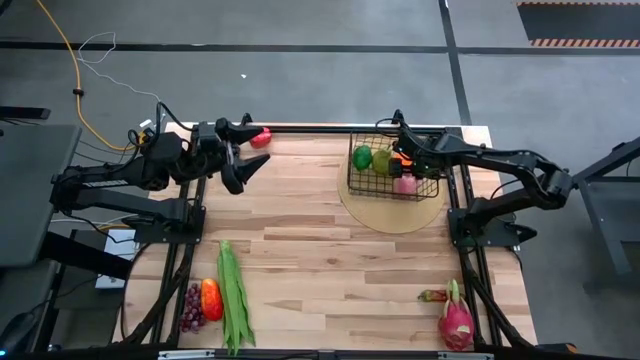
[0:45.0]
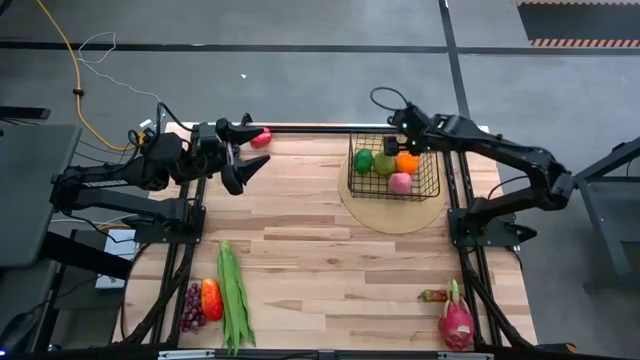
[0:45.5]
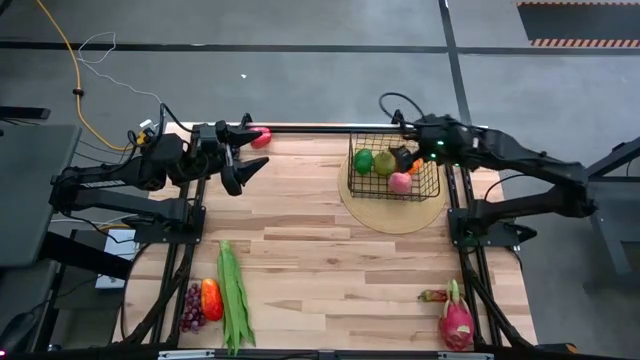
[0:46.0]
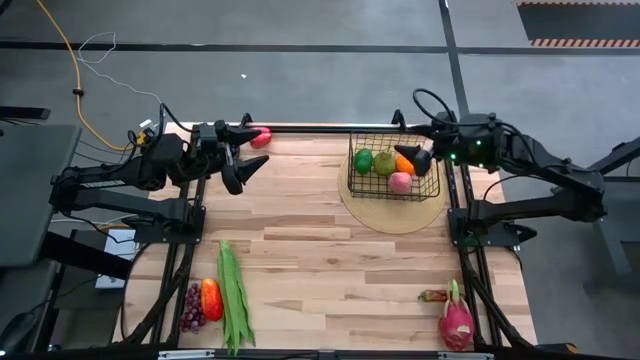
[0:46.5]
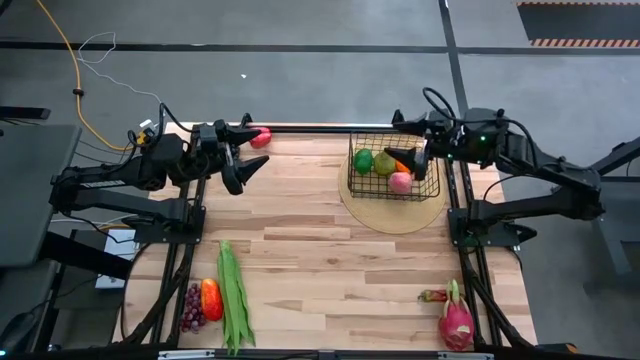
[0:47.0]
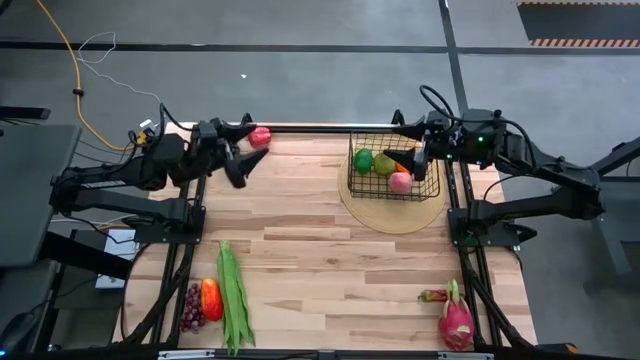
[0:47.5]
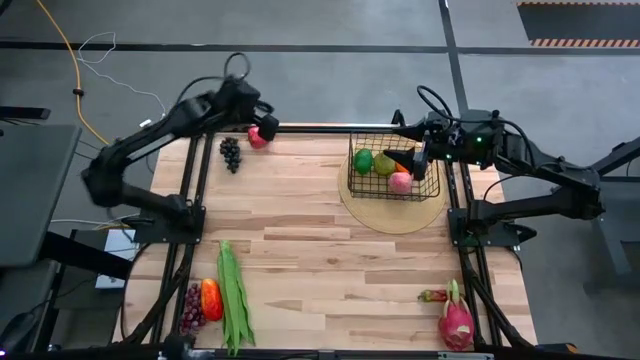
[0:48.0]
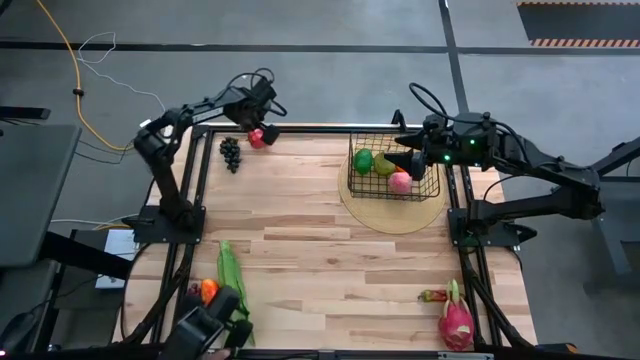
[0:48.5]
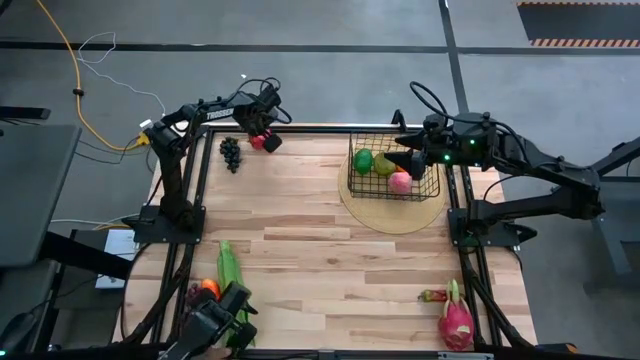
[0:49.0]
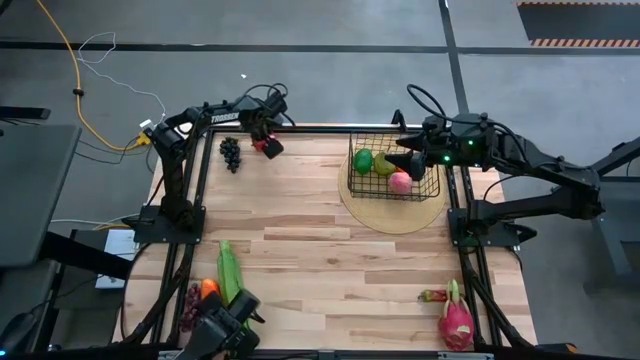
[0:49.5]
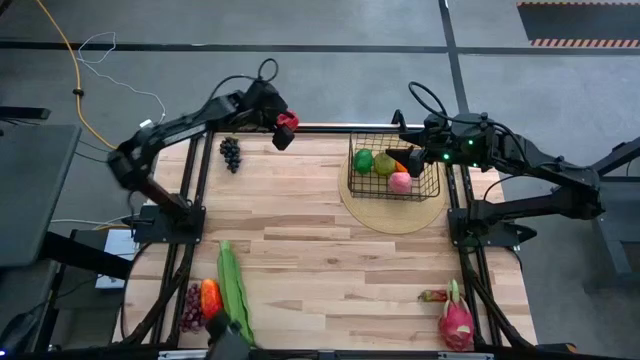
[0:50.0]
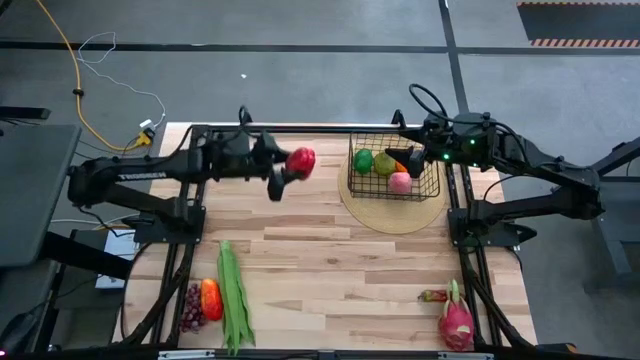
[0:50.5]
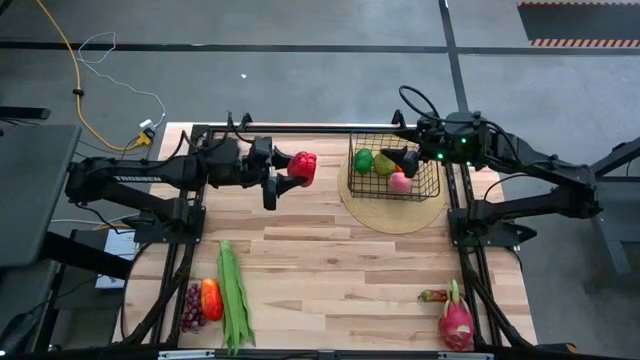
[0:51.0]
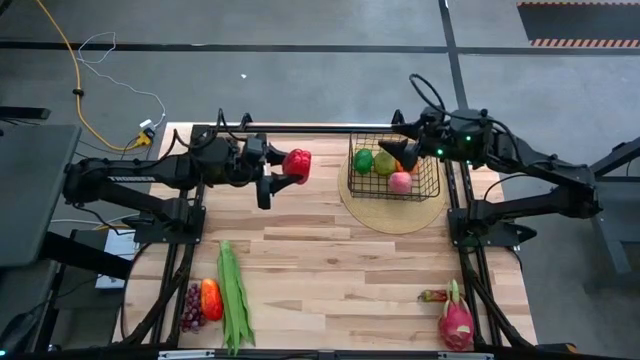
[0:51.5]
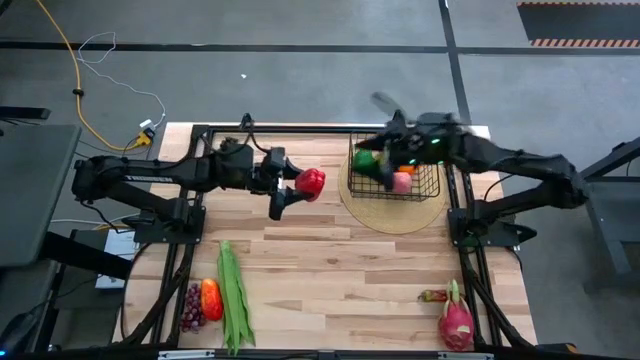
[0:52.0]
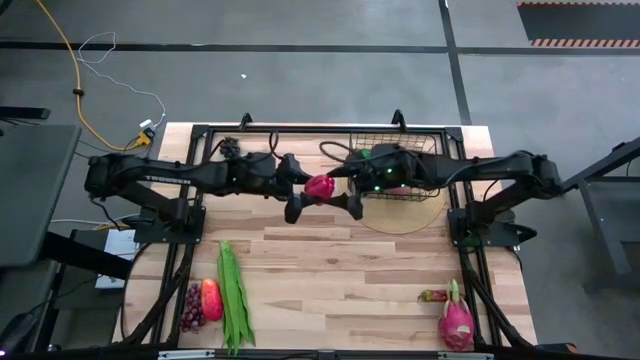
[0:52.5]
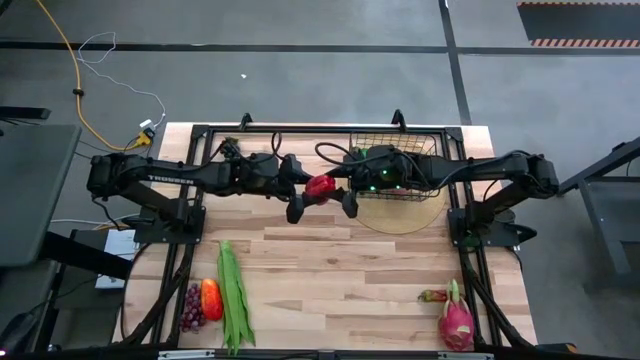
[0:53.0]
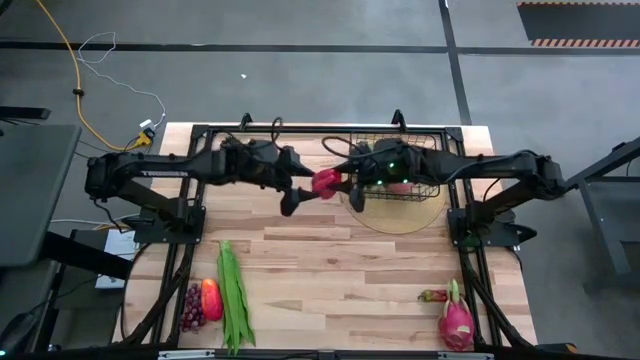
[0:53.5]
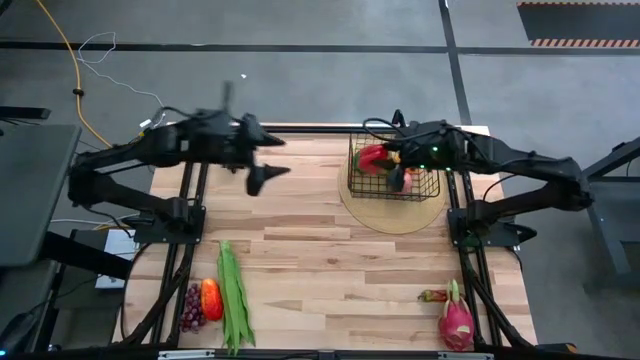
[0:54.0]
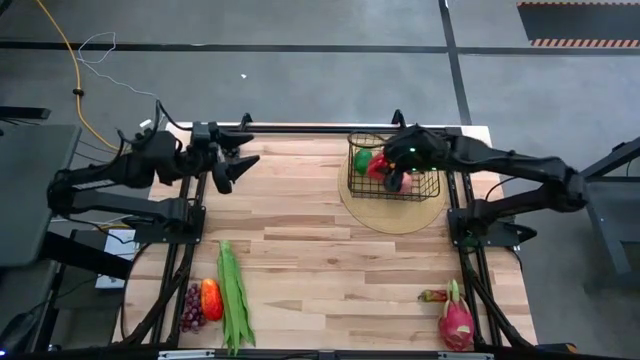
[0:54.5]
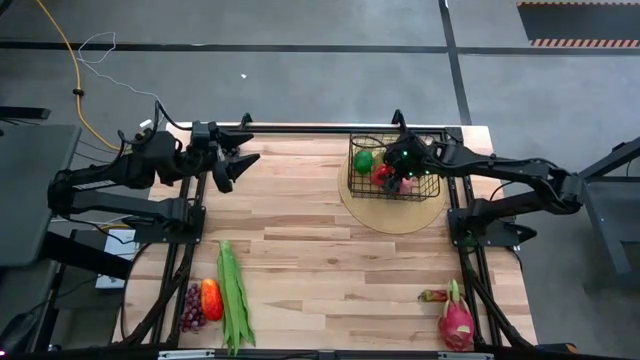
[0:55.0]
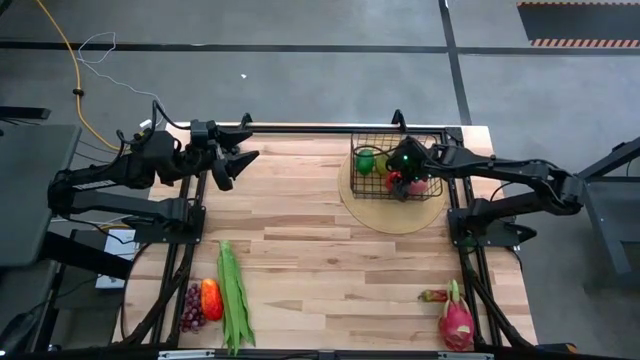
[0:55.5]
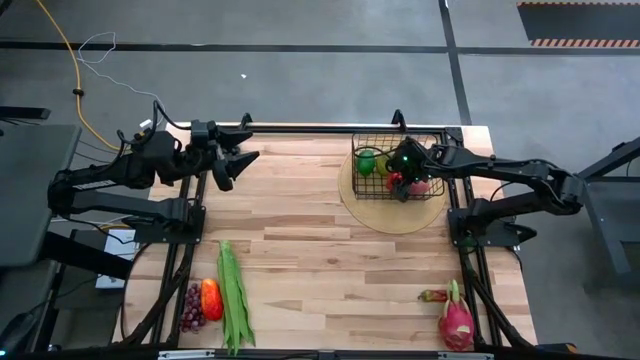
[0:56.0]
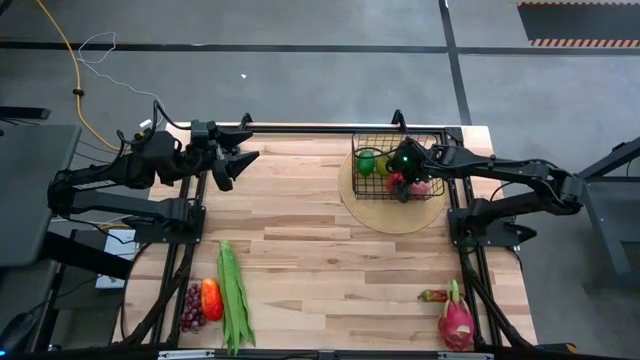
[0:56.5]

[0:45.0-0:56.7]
Task: Build produce basket
Put the red bell pepper into the black wire basket

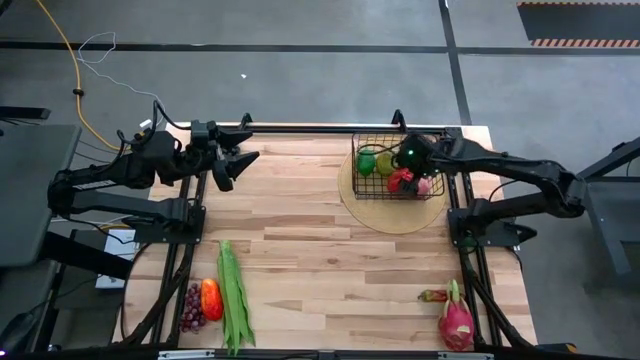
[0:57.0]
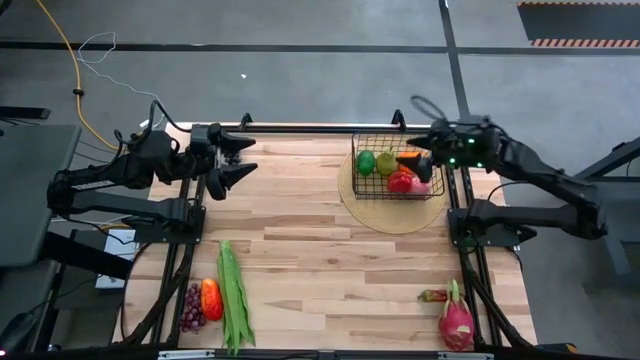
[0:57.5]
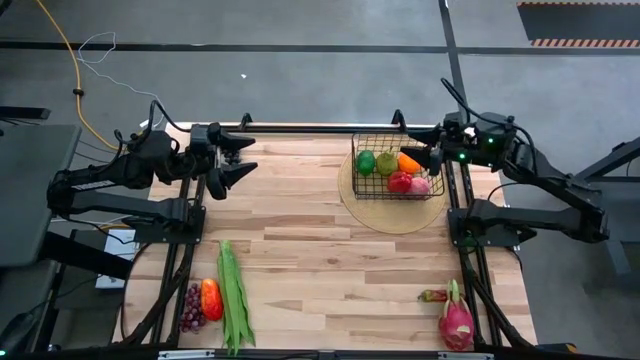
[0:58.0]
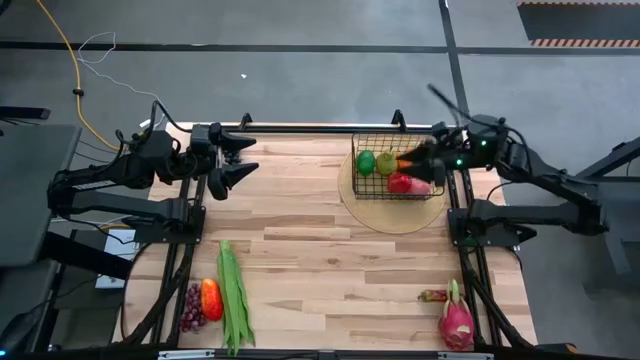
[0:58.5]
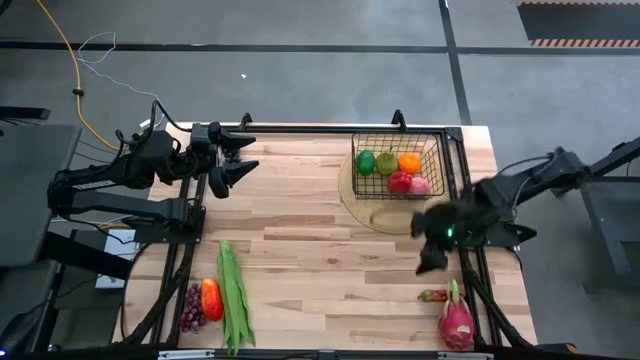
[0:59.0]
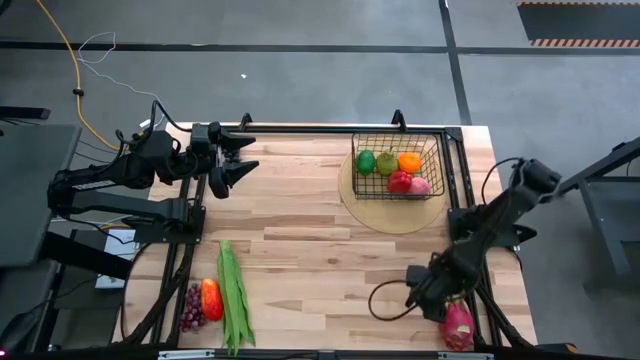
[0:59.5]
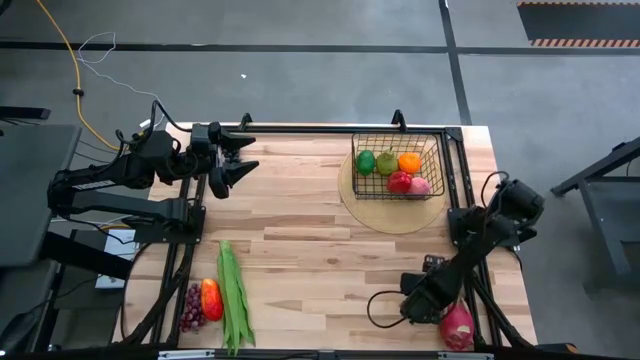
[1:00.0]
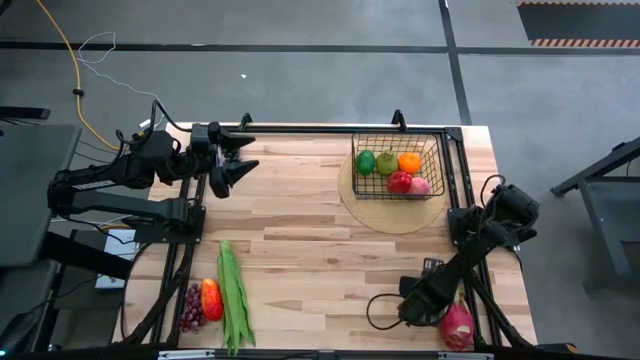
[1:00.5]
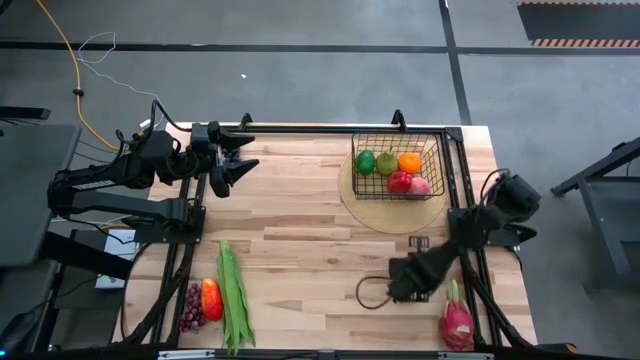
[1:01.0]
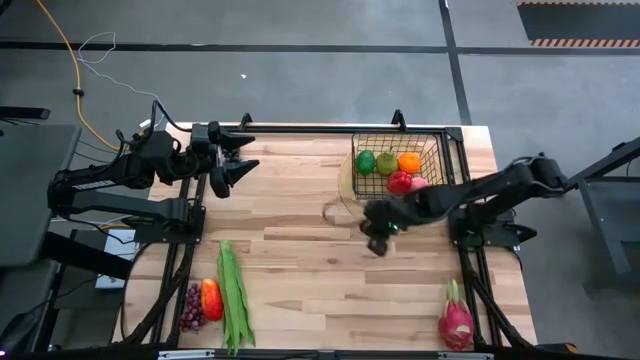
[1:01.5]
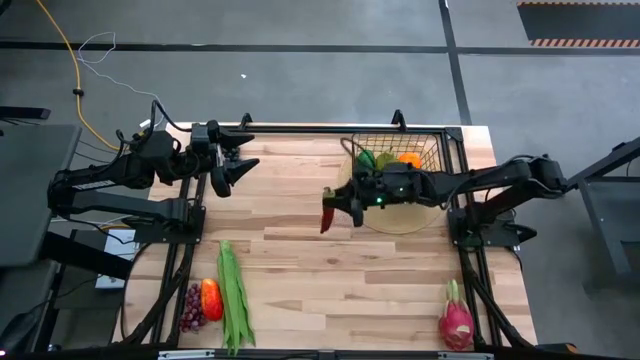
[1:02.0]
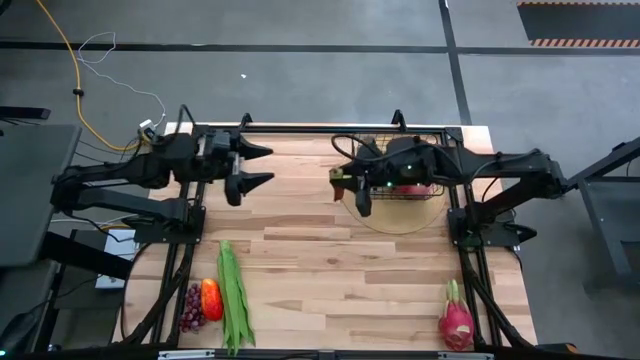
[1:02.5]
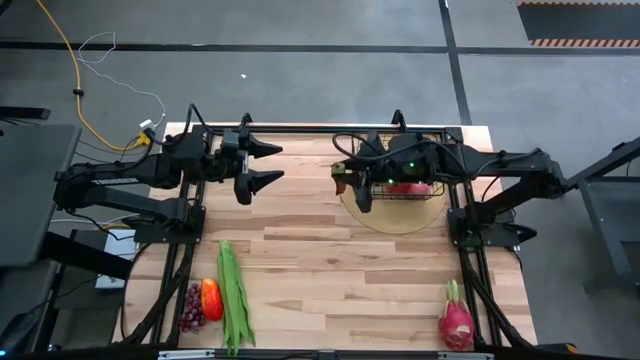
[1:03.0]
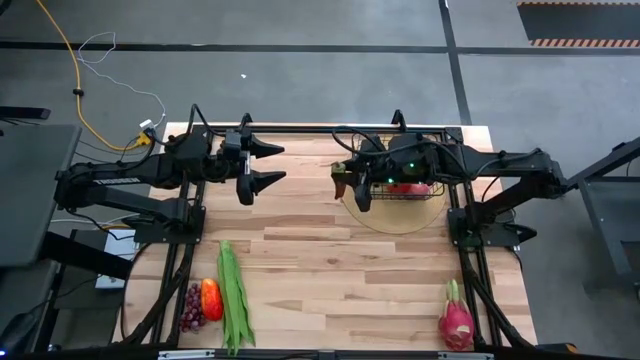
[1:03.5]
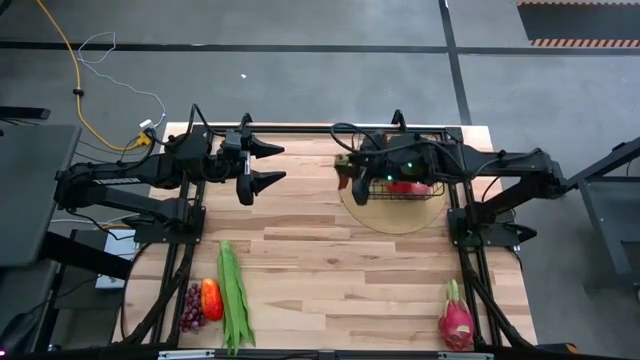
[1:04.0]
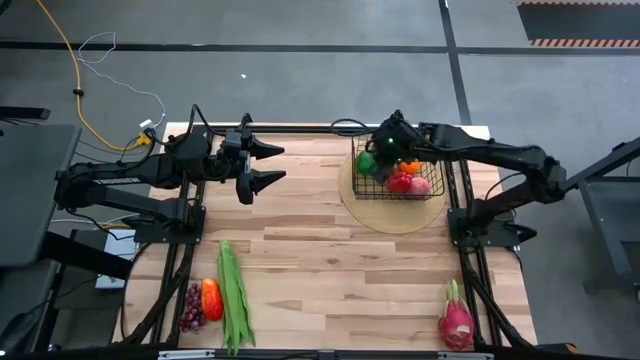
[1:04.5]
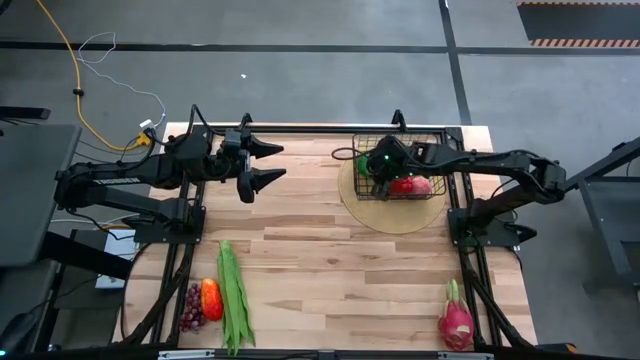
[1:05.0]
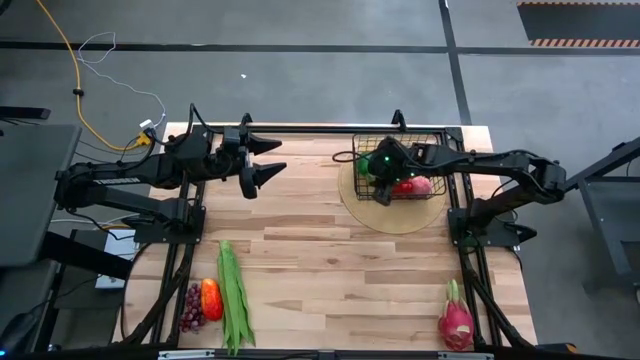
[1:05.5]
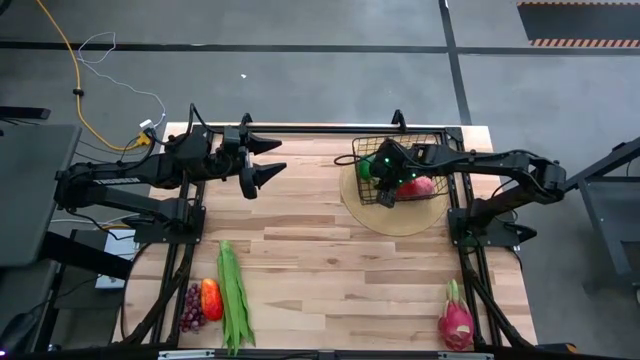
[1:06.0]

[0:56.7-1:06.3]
Put the dark red chili pepper into the black wire basket
